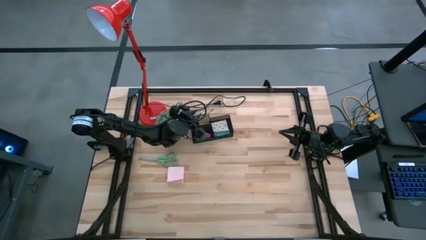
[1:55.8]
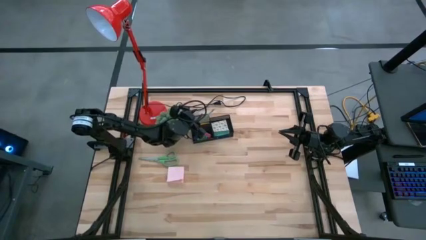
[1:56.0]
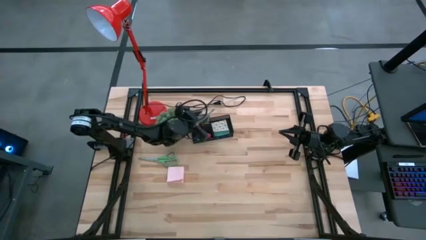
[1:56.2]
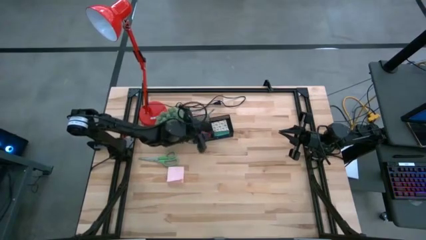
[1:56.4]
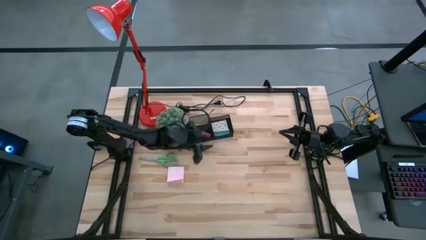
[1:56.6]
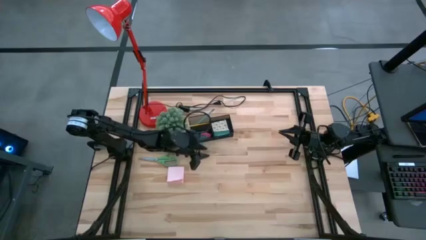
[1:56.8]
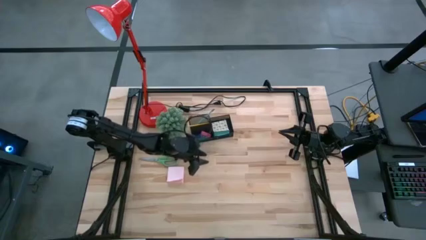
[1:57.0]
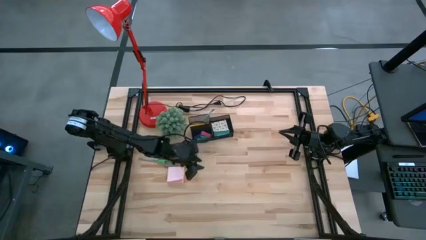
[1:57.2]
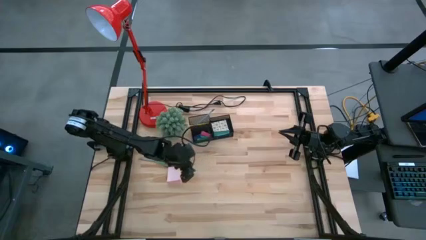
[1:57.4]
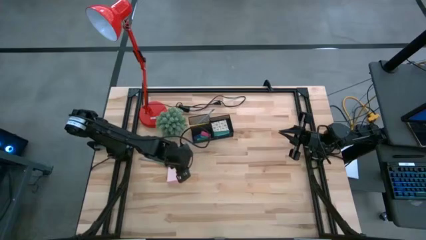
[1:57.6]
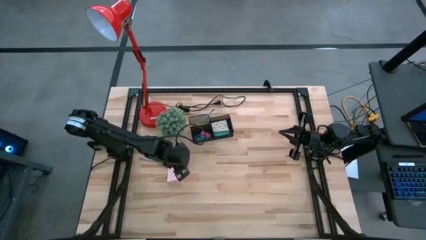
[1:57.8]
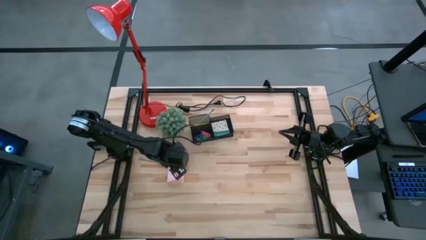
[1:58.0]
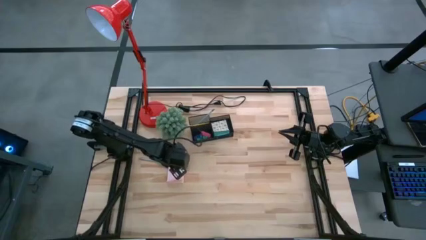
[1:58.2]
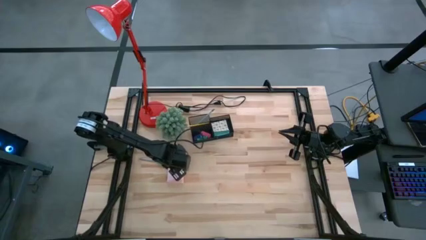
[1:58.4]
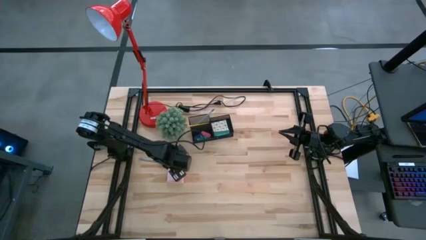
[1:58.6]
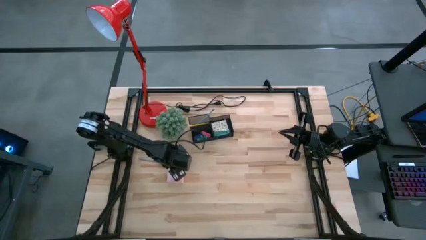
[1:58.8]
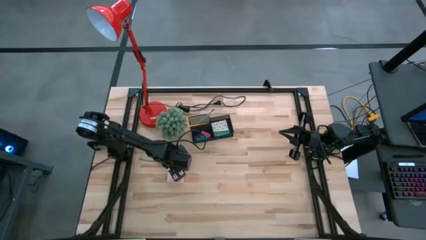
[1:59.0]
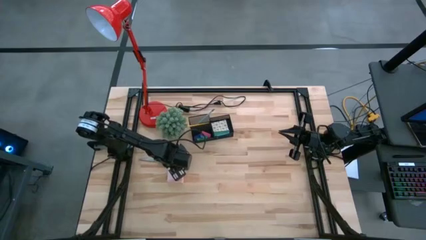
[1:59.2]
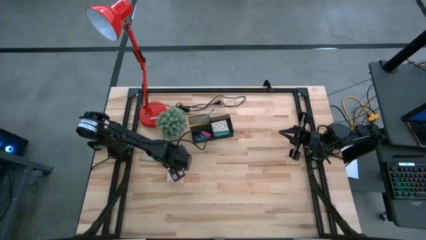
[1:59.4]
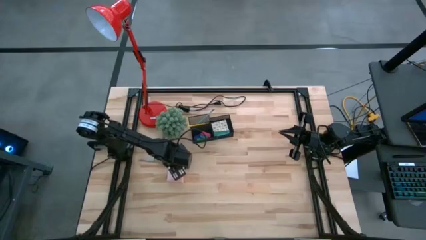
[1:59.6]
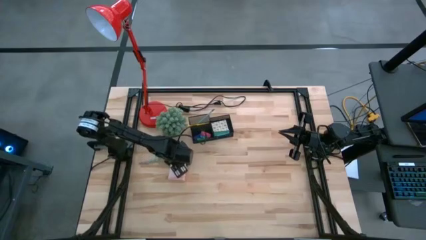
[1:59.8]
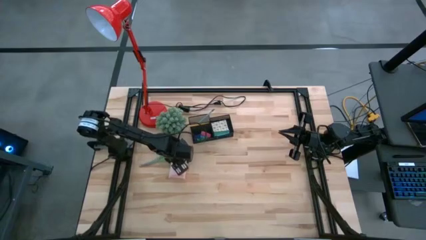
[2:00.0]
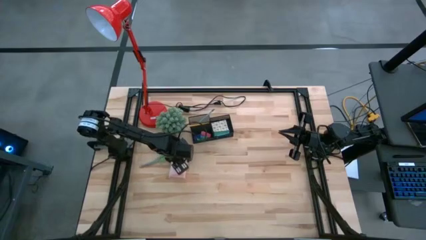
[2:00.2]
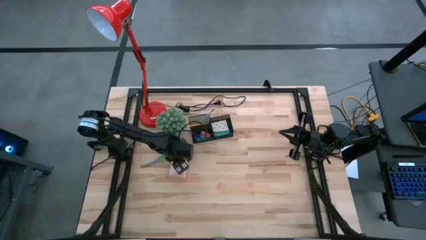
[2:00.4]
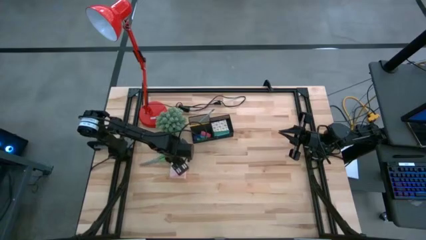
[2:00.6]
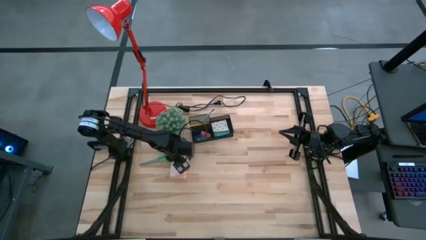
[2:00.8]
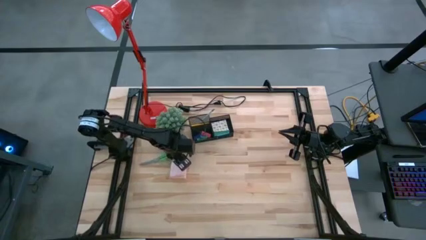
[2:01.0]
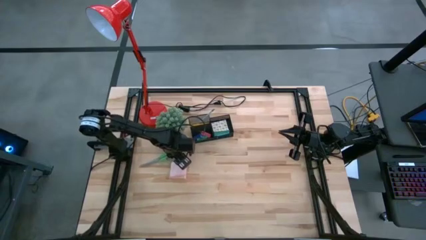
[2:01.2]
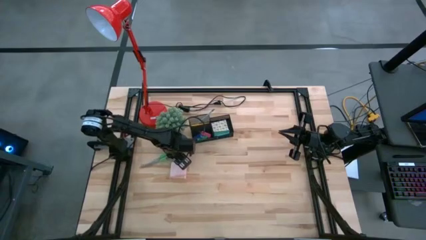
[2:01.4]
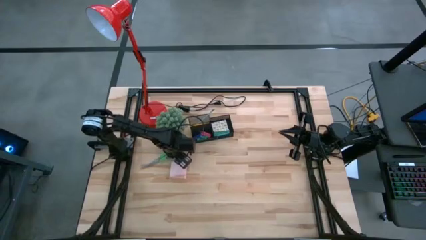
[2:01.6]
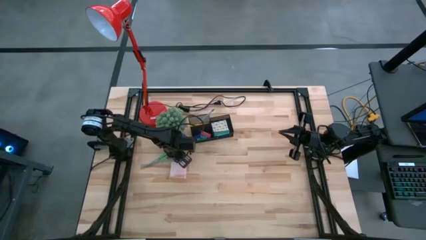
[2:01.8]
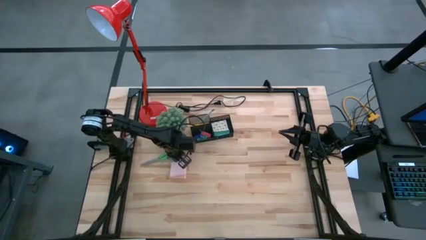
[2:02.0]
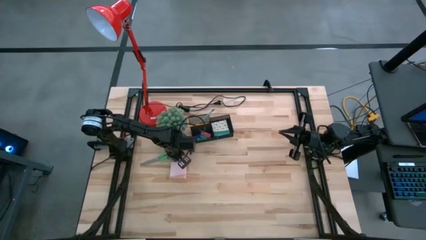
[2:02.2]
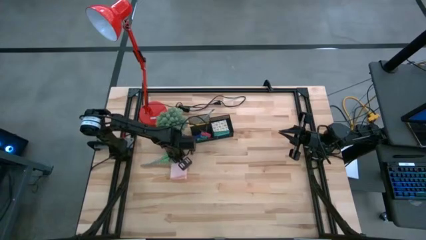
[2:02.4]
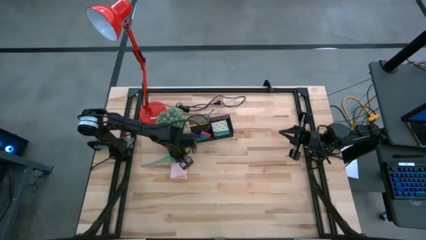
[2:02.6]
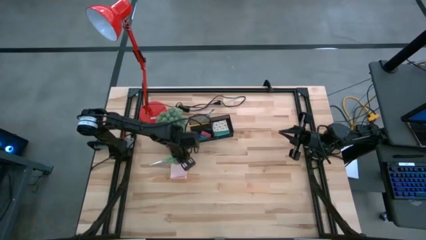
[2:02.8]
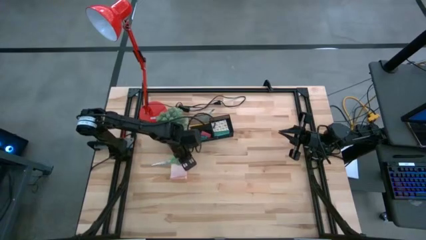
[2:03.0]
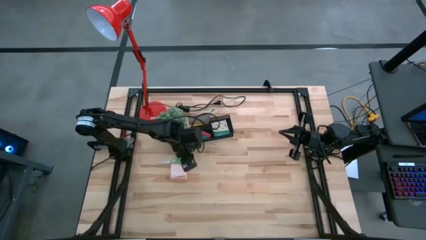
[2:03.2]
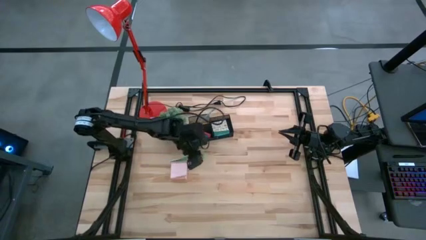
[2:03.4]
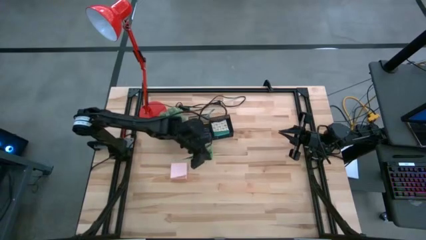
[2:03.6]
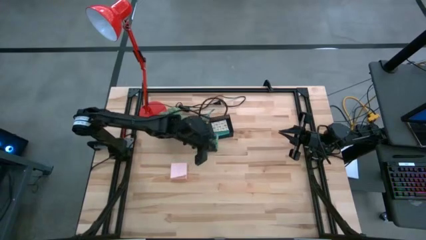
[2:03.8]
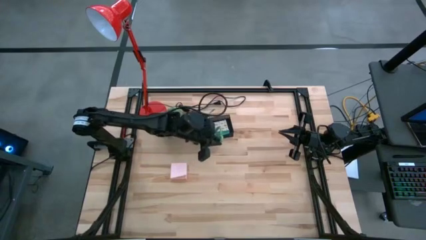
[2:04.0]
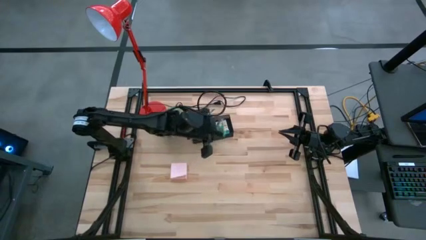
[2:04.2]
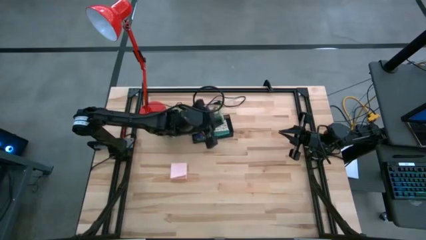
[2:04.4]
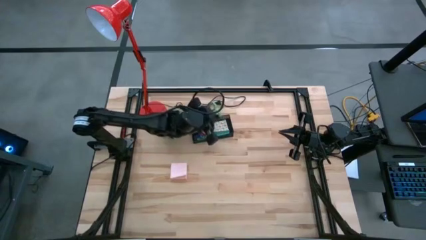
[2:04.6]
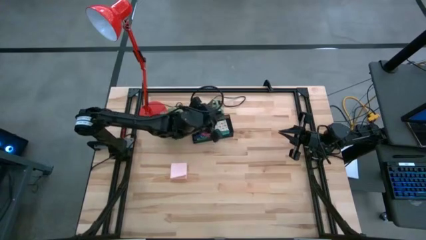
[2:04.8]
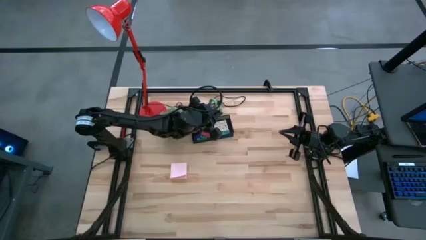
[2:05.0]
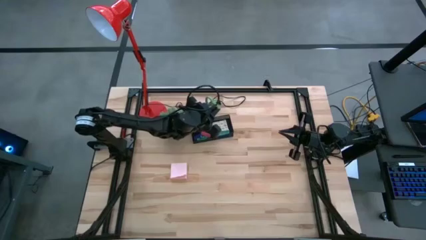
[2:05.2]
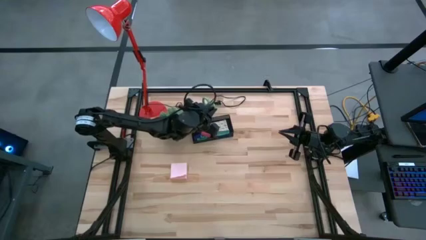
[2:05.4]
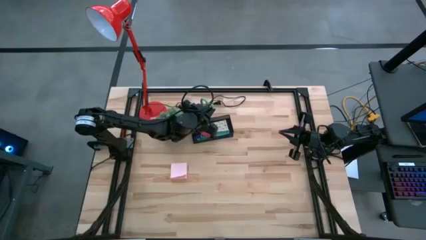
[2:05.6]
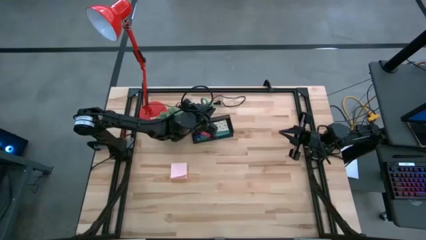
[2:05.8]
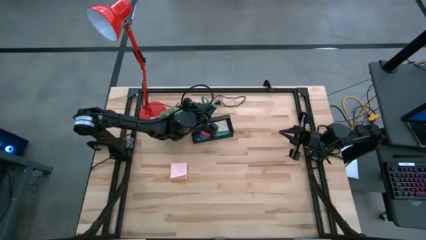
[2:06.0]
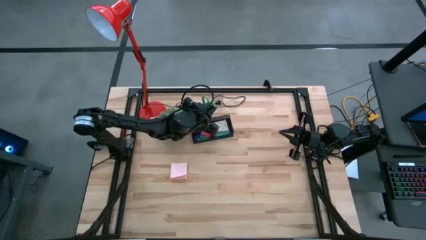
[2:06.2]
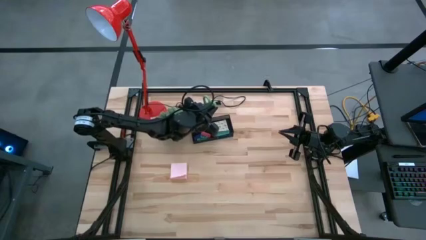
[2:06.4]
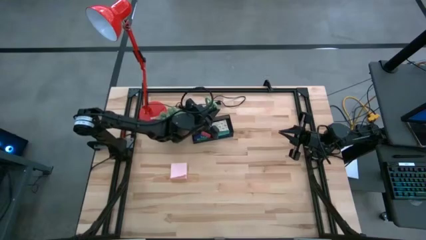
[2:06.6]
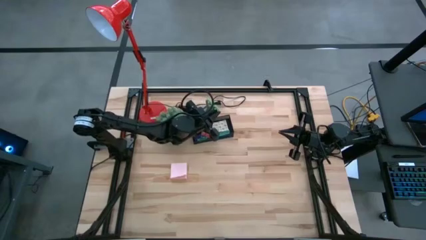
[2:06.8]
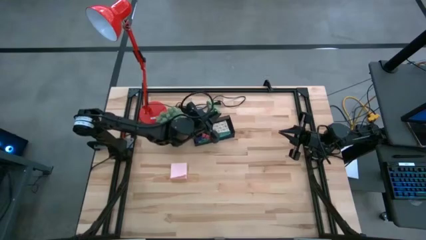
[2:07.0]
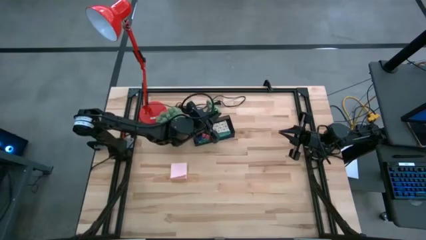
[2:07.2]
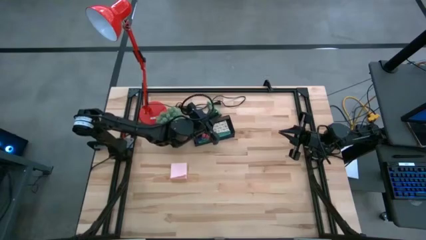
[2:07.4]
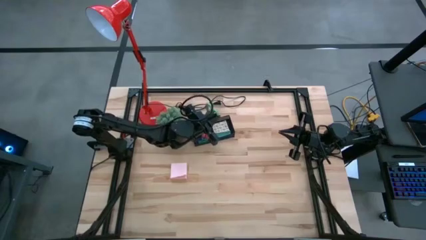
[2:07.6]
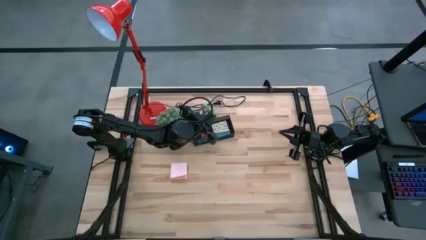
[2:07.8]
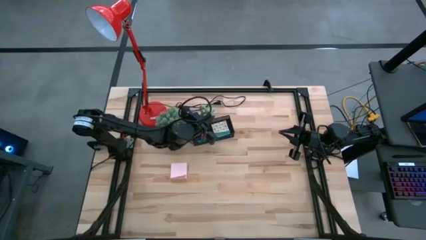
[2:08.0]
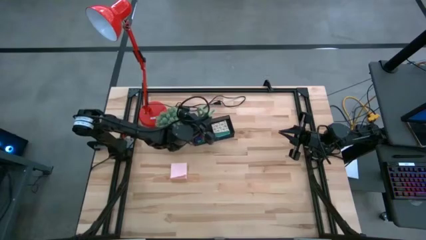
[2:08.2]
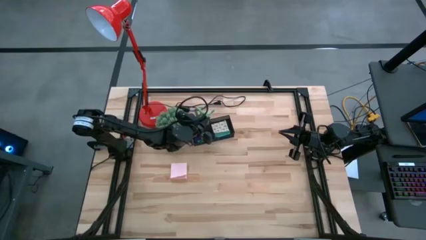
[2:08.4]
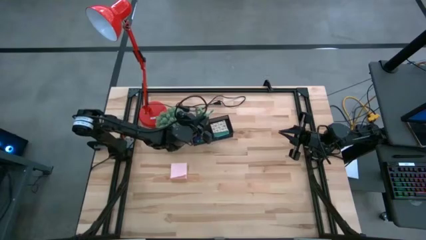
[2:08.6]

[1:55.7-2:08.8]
Task: Pick and place office supplies into organizer
Put the green scissors into the desk organizer

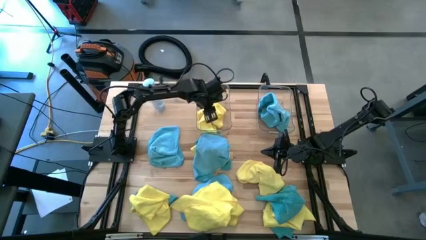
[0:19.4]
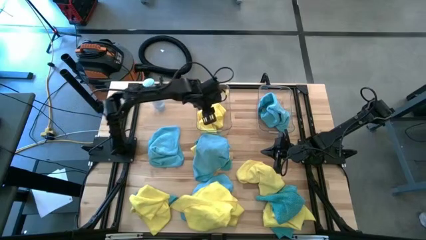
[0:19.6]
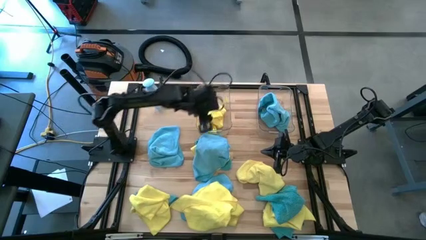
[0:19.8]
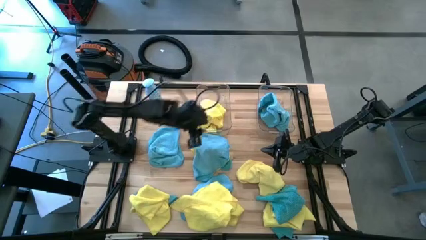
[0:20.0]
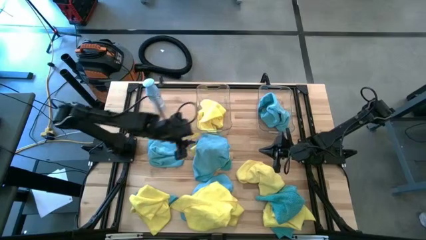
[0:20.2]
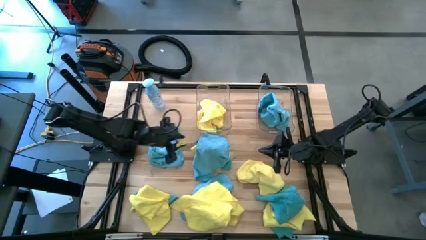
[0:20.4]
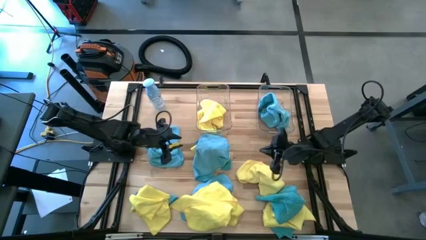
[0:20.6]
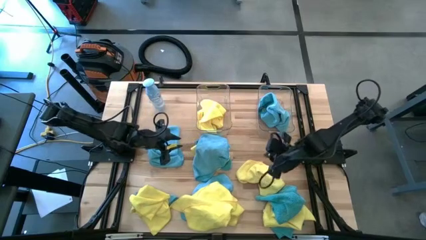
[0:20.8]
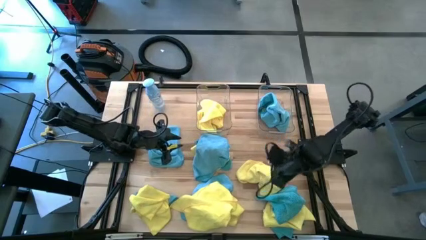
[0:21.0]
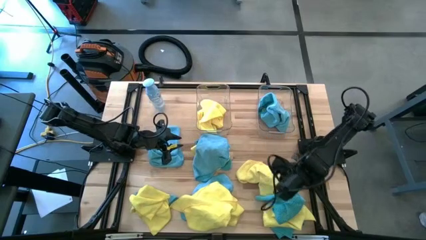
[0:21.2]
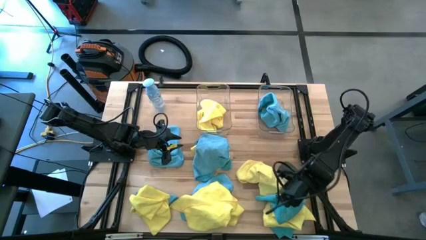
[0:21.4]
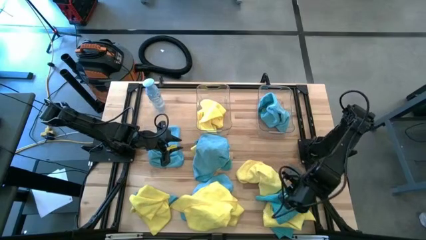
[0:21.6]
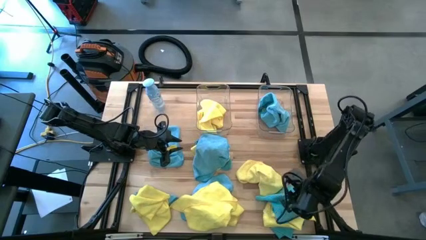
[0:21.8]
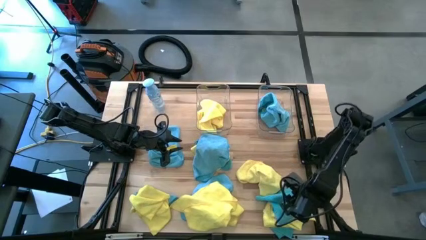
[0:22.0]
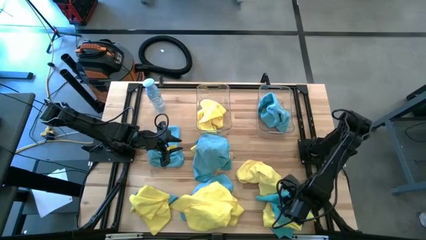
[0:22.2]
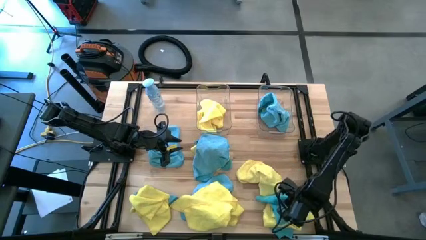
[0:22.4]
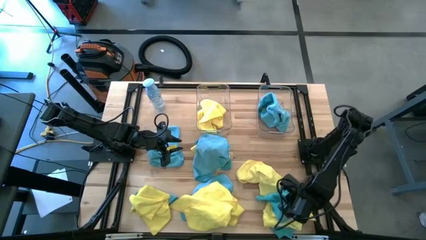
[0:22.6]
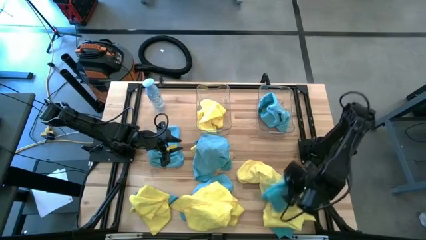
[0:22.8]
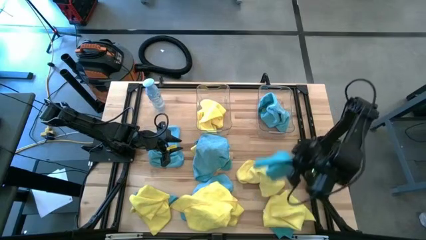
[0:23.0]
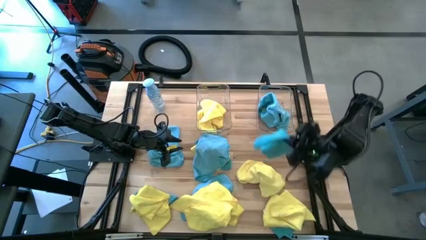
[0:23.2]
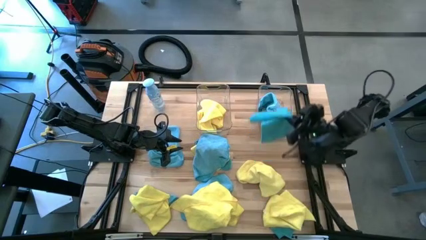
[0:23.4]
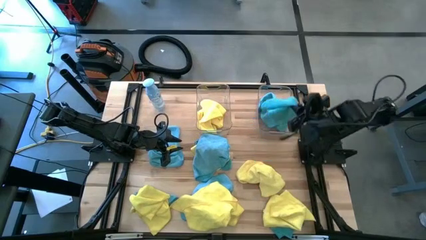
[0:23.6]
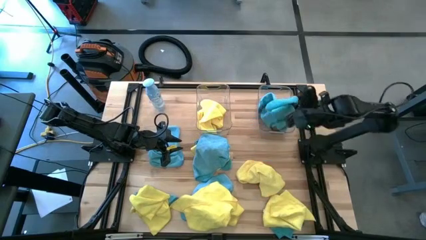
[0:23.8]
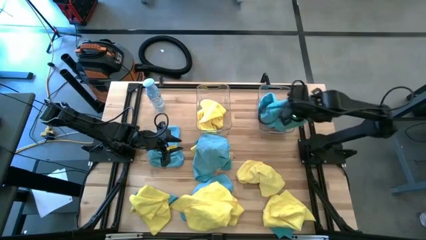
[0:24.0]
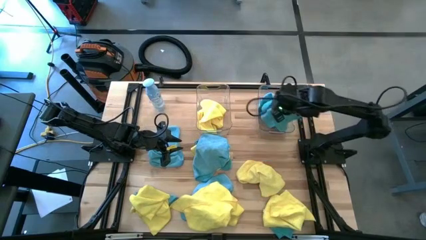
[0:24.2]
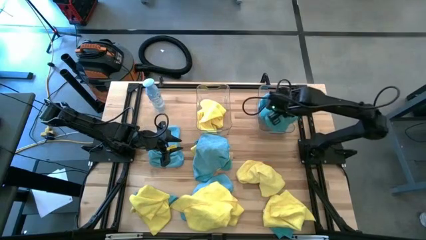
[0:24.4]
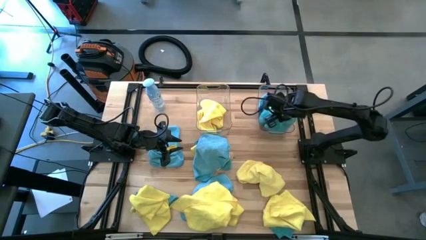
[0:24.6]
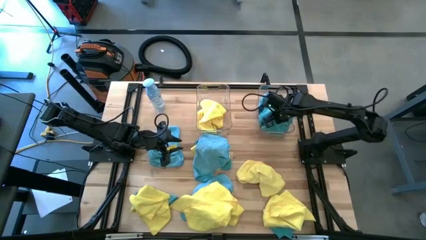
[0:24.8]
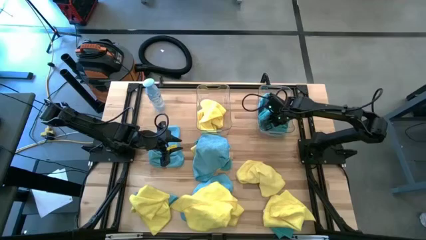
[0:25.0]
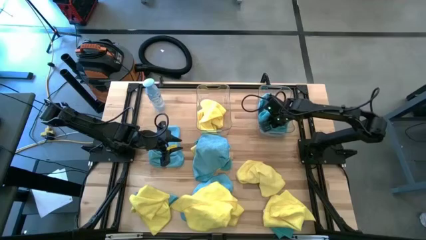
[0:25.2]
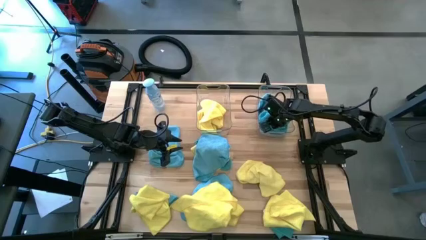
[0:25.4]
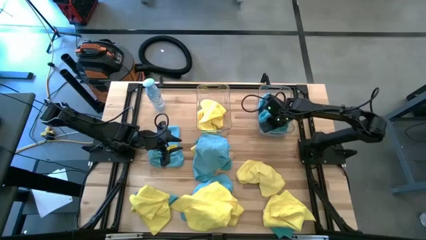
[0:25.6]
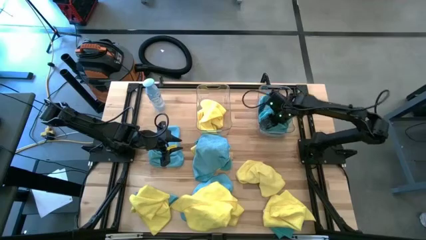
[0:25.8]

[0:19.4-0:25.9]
Task: Sort microfiber towel by color & place in baskets
Put the blue towel into the right transparent bin
